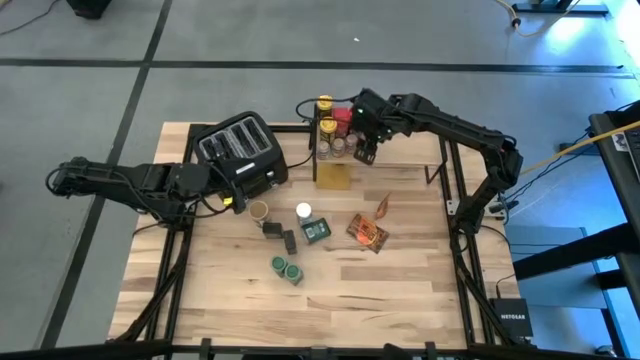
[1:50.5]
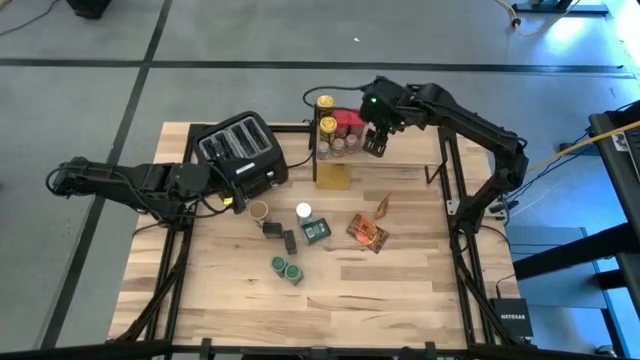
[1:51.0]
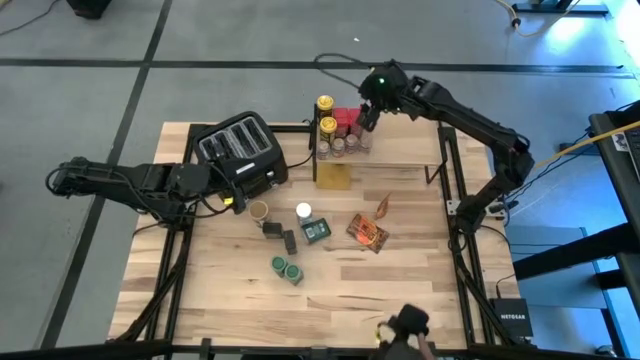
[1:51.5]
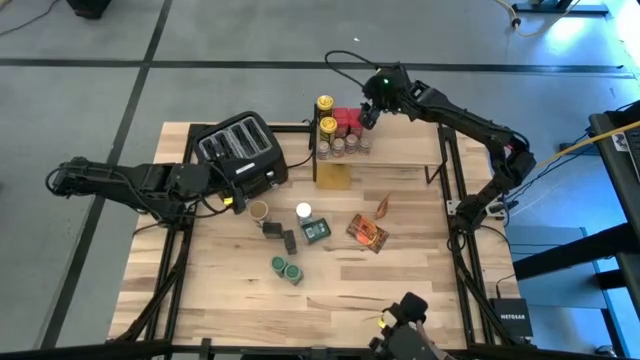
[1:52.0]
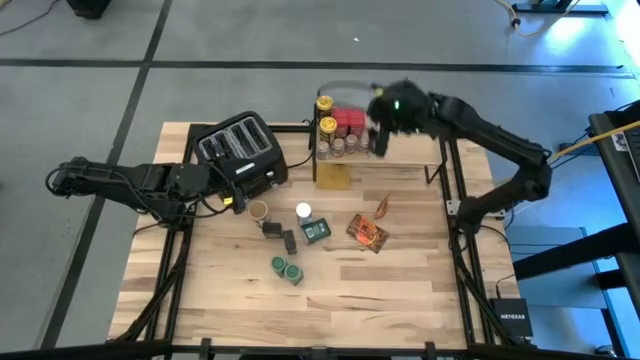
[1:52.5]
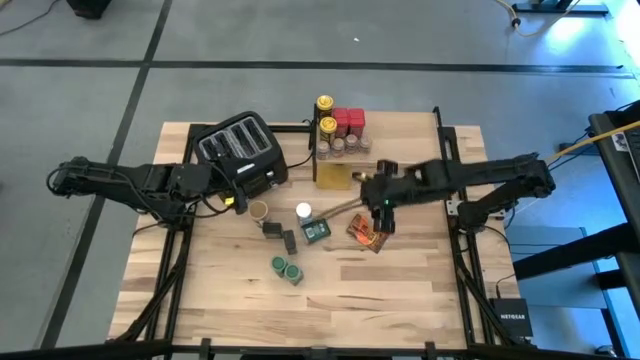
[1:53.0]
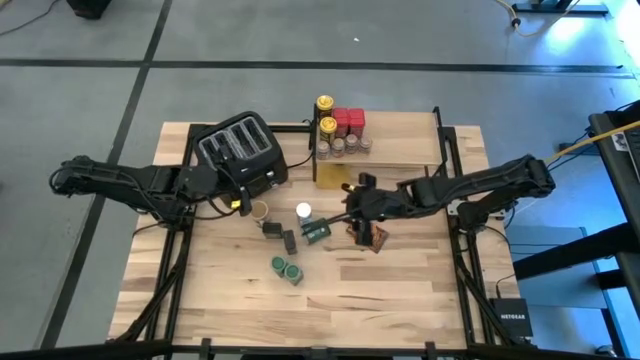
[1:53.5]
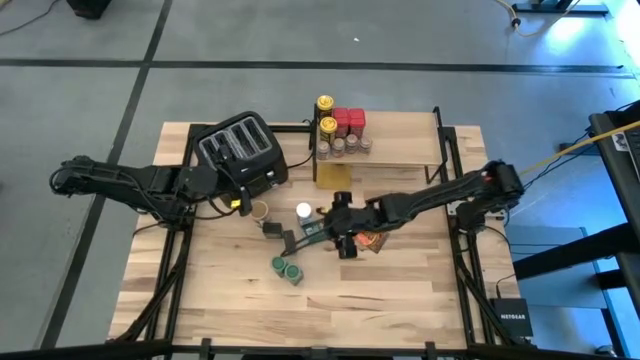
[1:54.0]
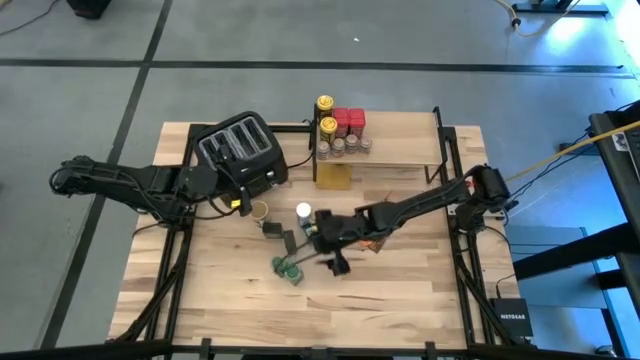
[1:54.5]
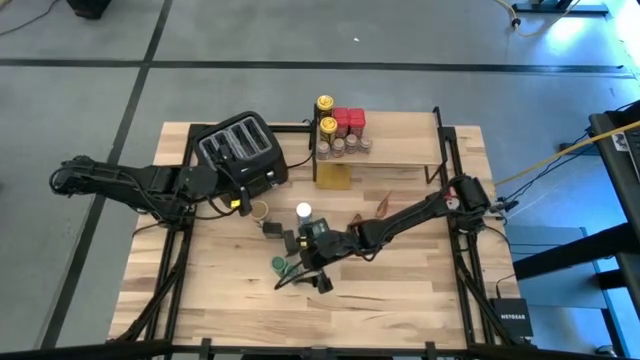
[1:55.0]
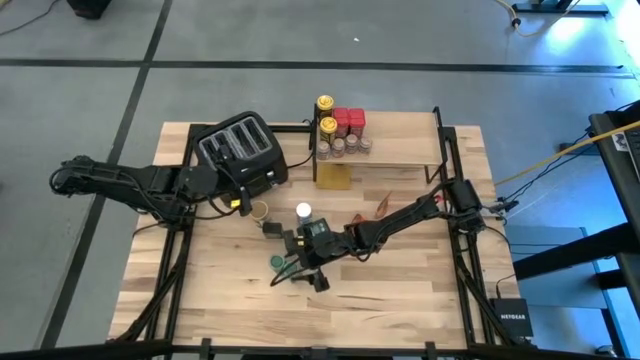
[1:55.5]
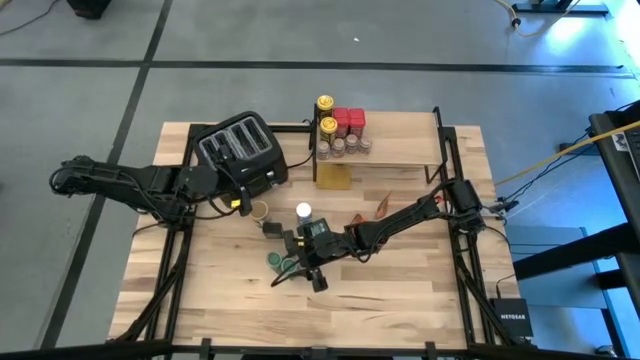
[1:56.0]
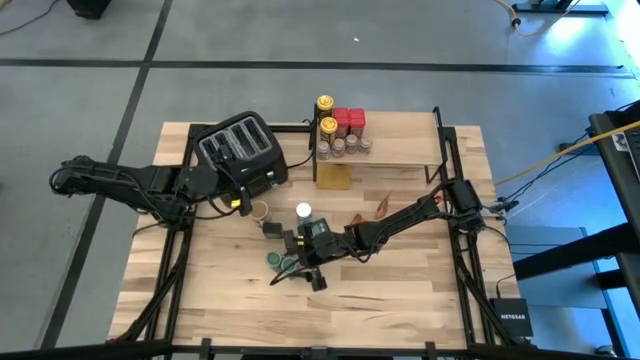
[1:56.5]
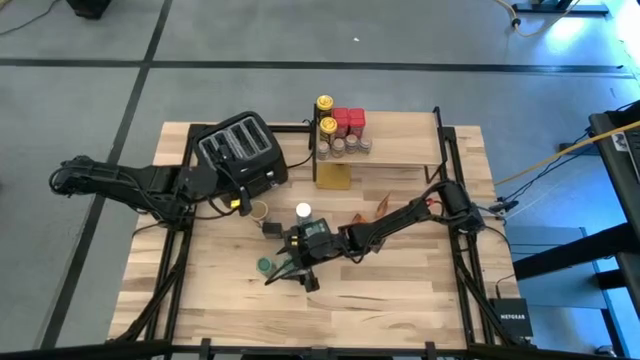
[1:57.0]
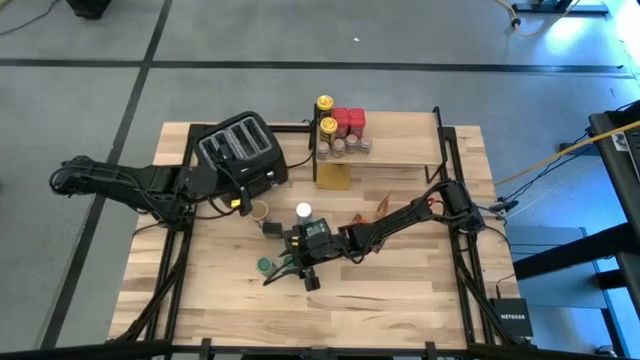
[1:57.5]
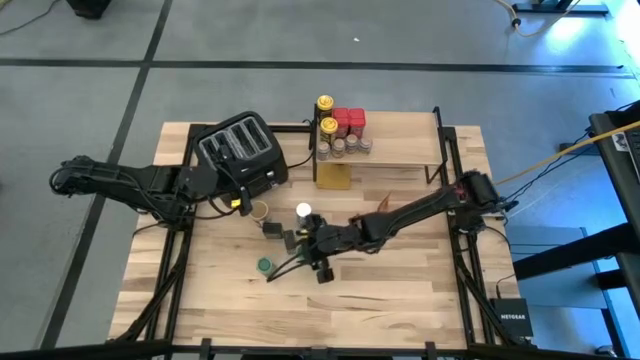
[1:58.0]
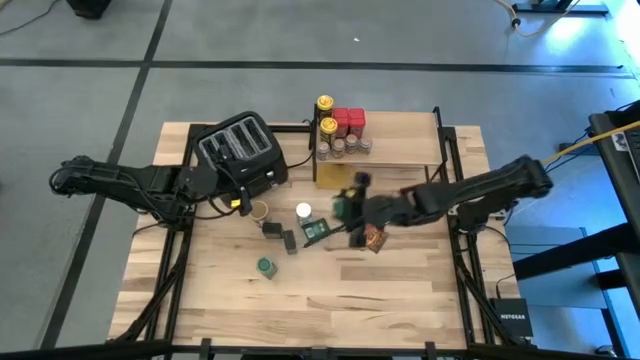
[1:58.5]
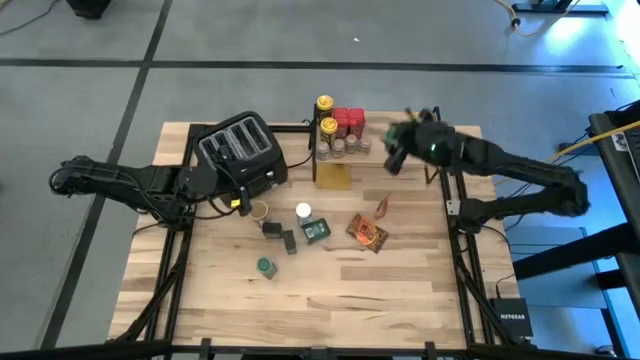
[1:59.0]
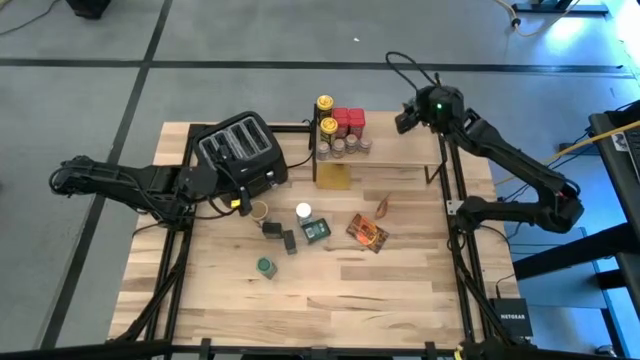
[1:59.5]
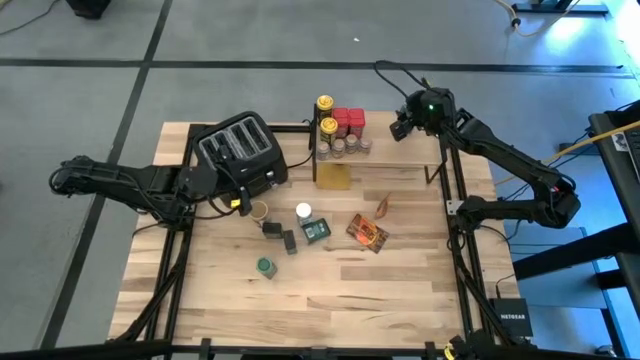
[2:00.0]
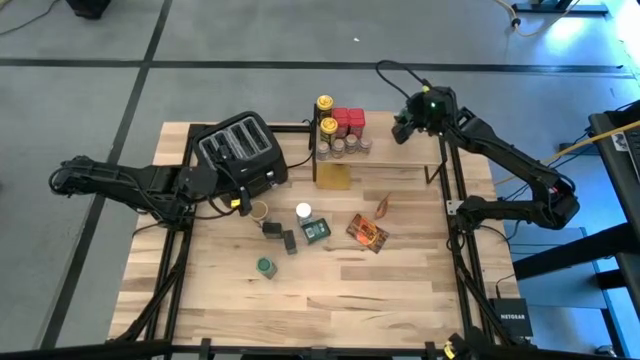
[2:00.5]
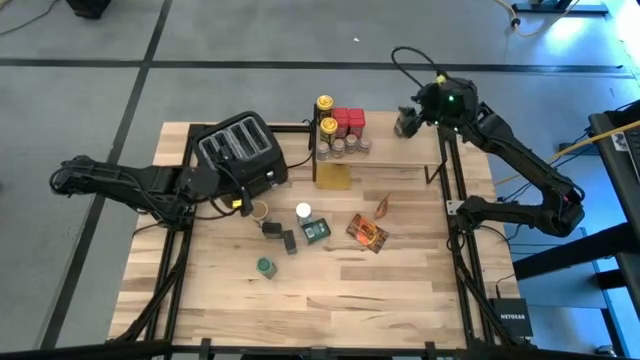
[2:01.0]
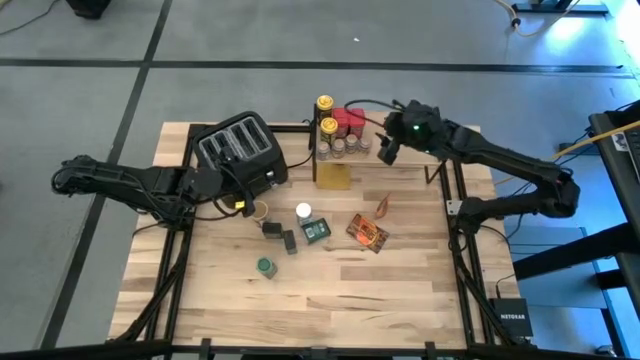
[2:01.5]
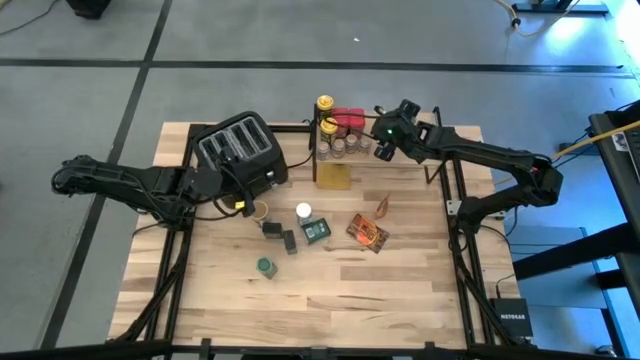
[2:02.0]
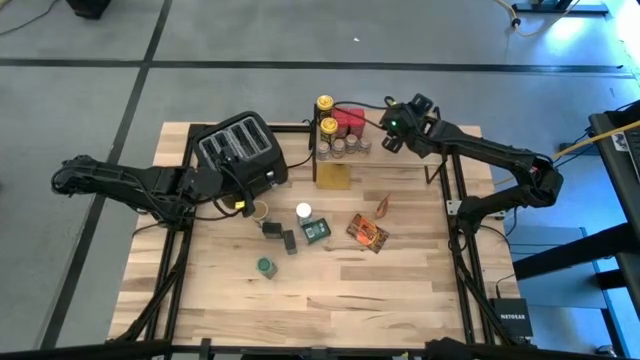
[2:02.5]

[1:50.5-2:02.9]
Task: Shelf spices
Put the green seasoning bottle on the shelf

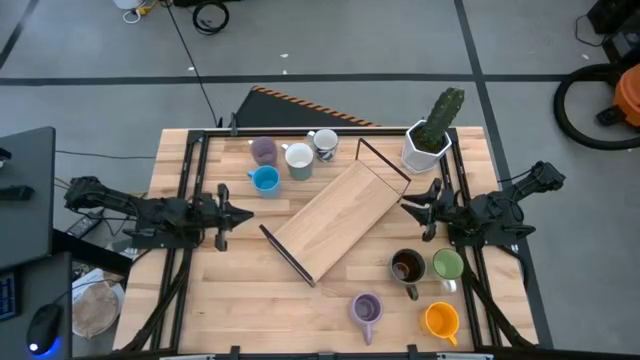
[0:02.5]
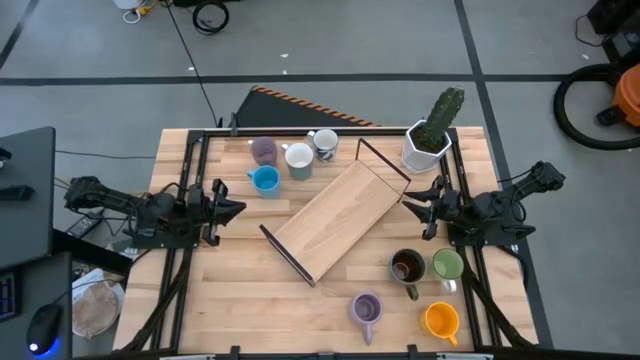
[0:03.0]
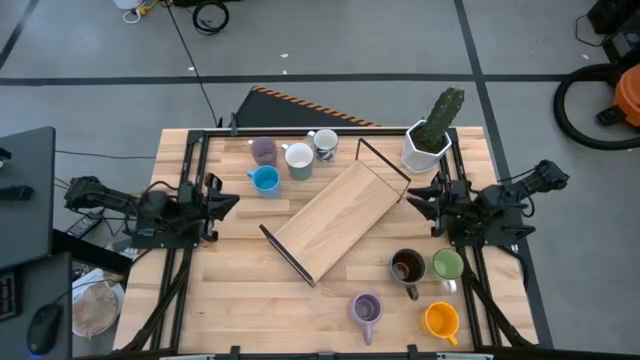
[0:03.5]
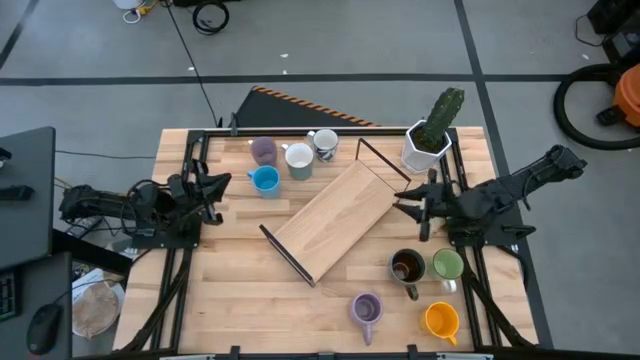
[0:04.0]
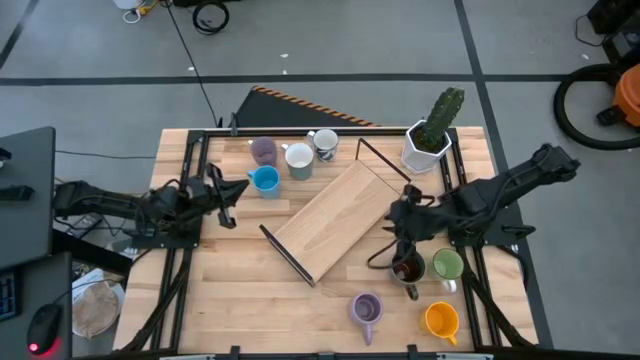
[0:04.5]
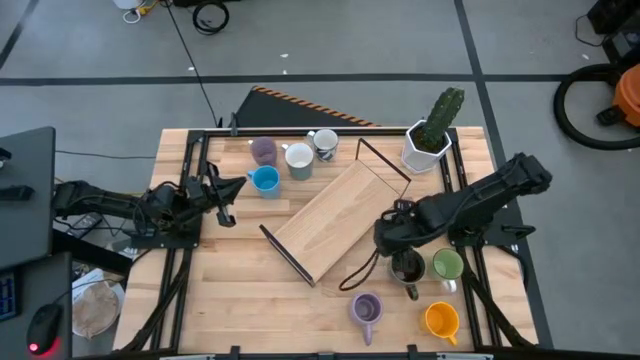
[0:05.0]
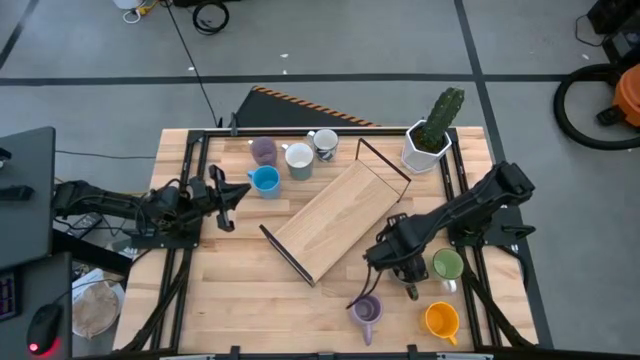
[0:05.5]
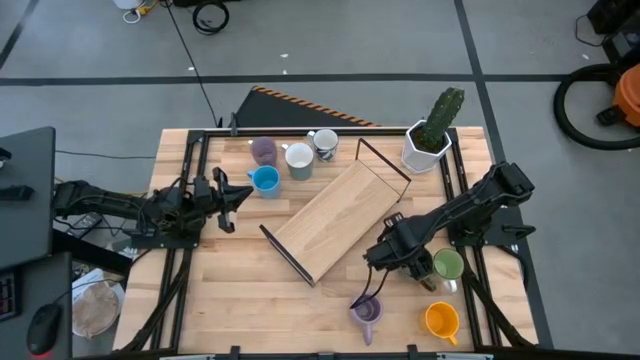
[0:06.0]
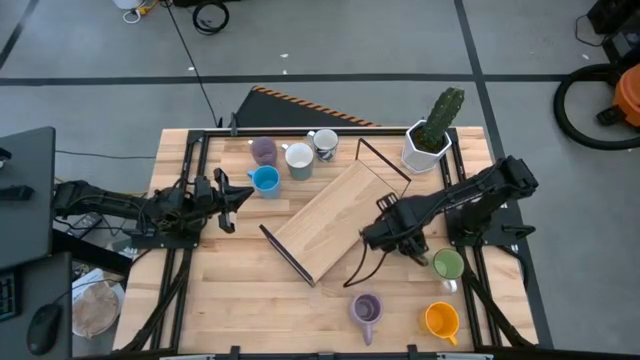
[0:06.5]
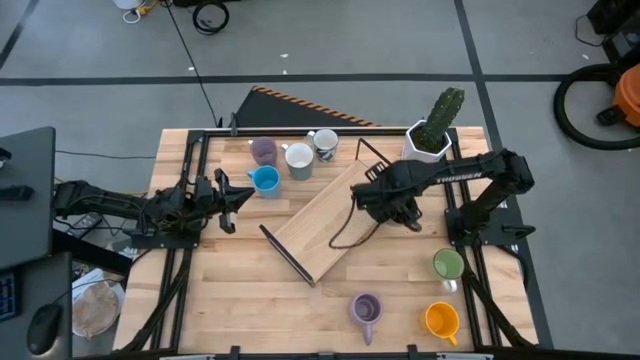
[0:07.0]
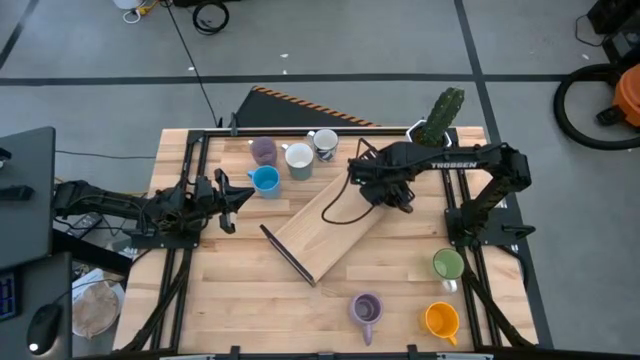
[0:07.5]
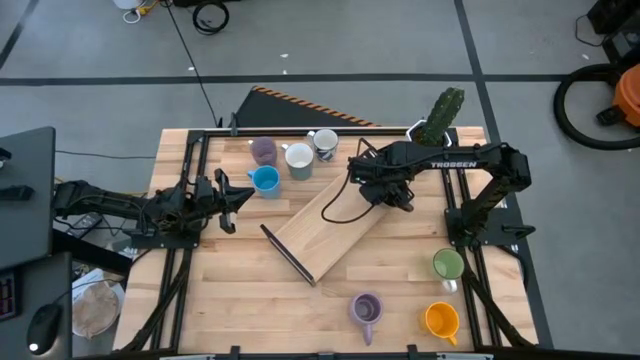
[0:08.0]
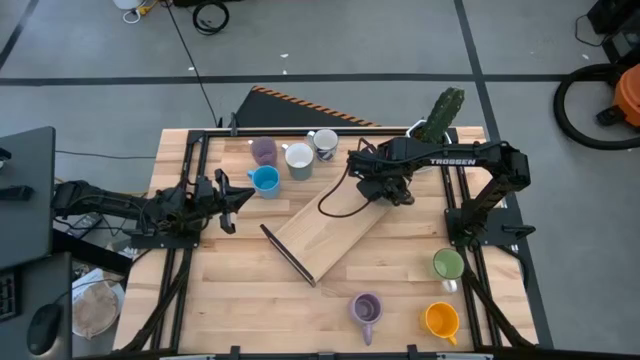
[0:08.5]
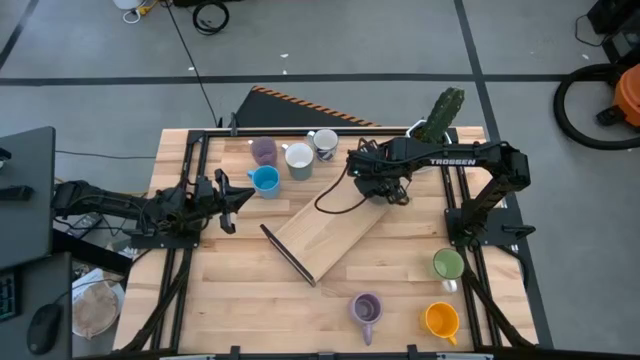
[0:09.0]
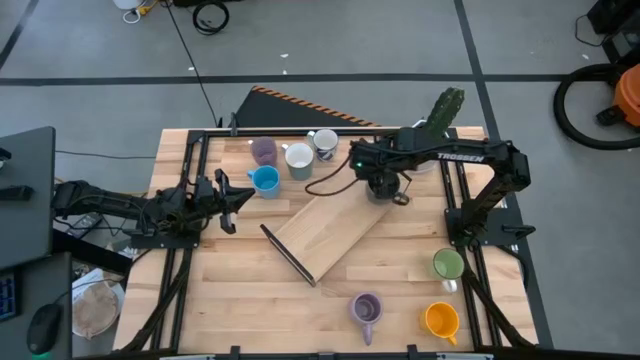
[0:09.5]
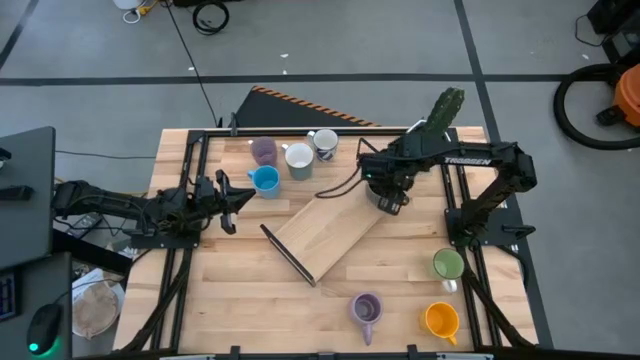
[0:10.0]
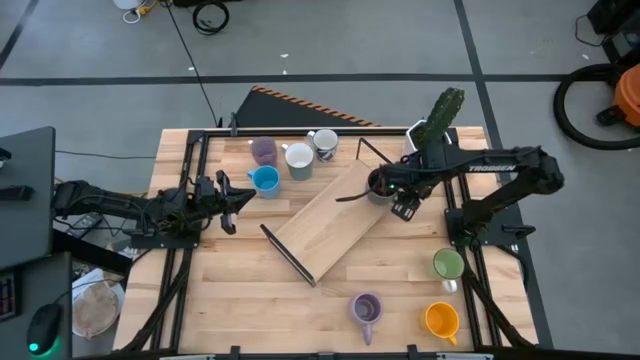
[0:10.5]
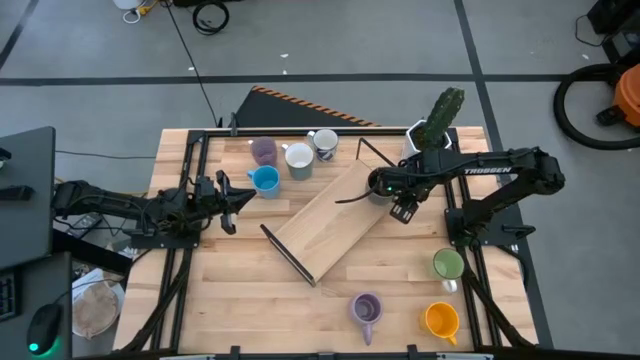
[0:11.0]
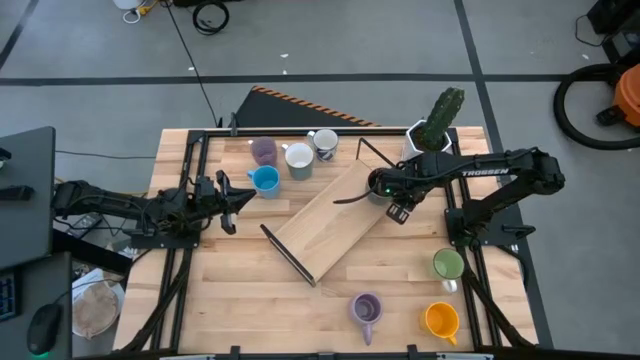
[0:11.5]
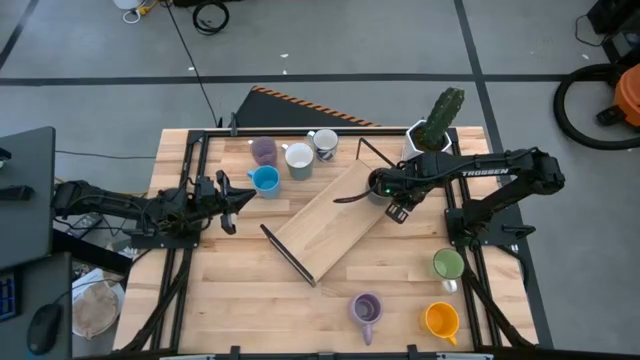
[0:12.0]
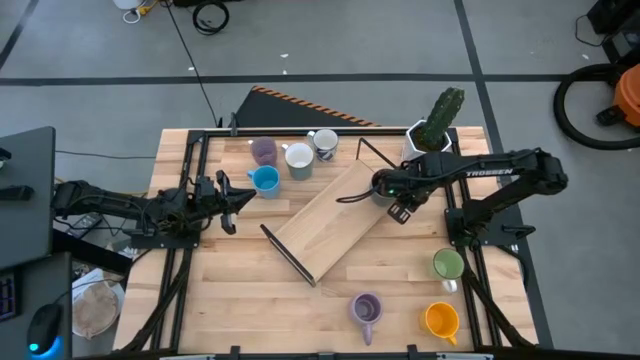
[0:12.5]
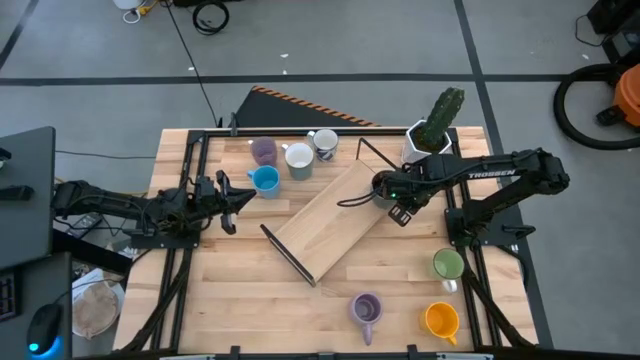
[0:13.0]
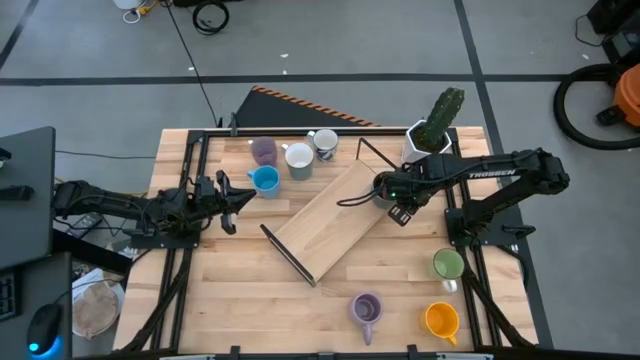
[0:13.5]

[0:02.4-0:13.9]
Task: Place coffee mugs
Put the blue brown mug on the shelf
